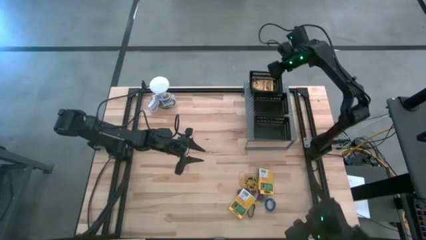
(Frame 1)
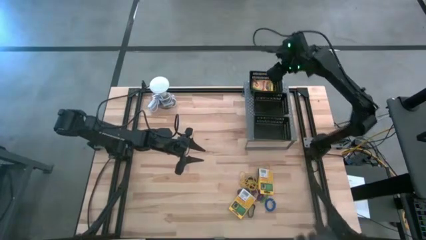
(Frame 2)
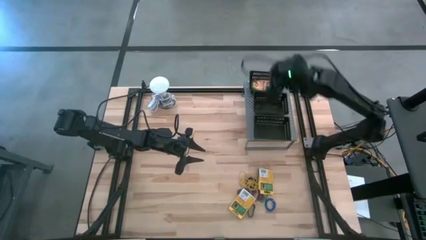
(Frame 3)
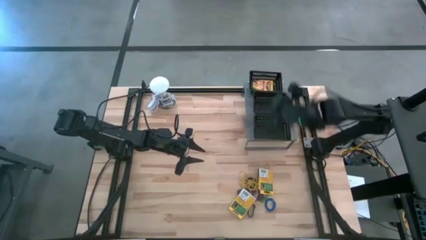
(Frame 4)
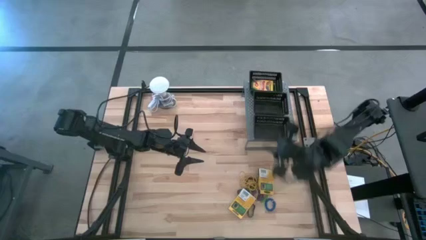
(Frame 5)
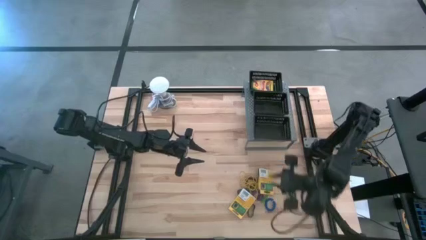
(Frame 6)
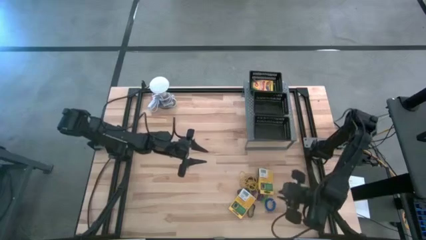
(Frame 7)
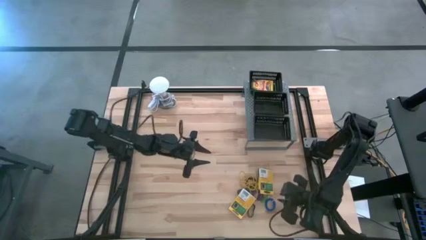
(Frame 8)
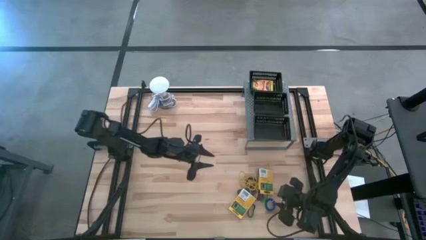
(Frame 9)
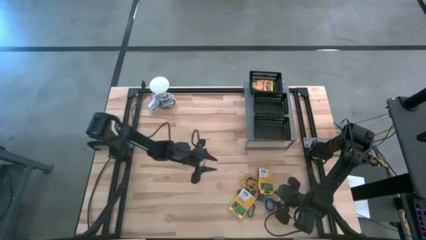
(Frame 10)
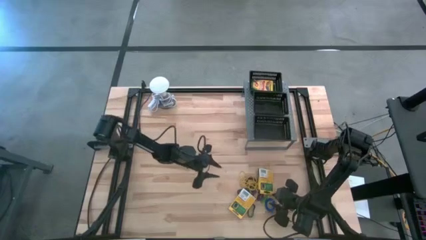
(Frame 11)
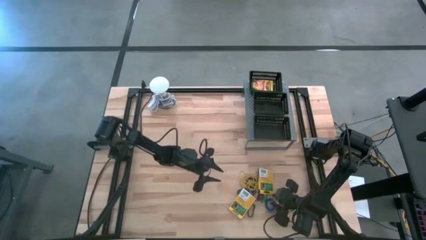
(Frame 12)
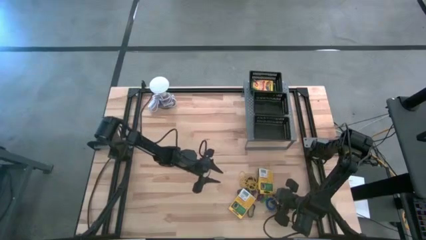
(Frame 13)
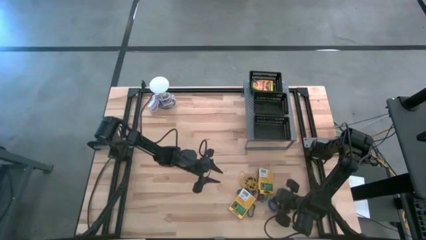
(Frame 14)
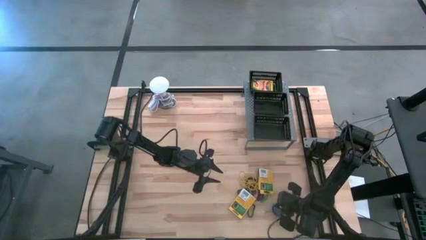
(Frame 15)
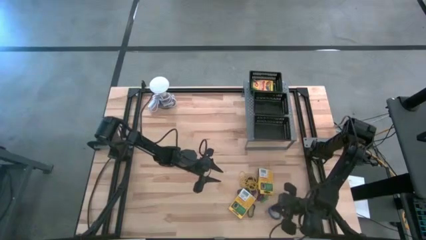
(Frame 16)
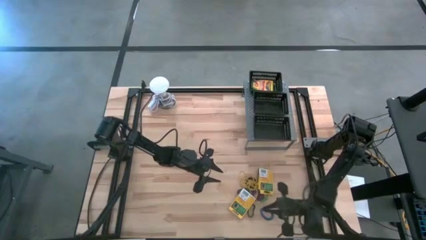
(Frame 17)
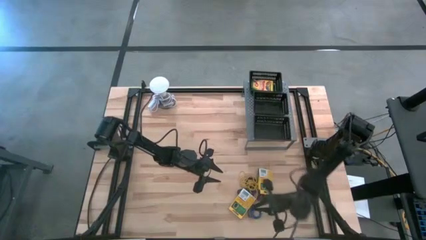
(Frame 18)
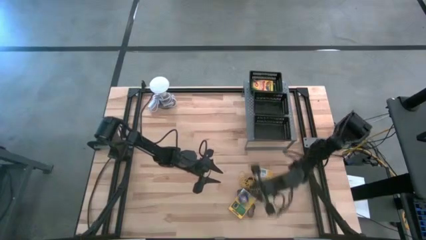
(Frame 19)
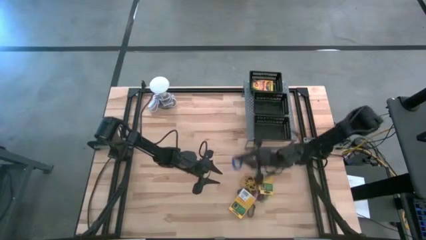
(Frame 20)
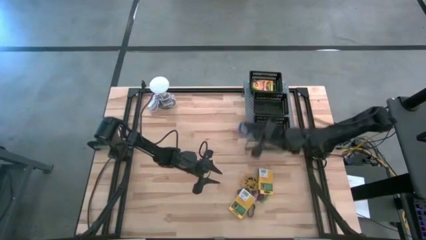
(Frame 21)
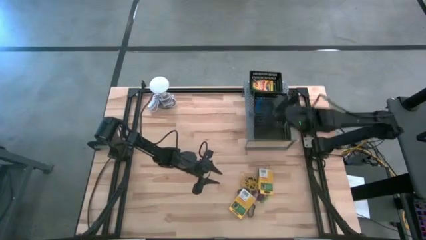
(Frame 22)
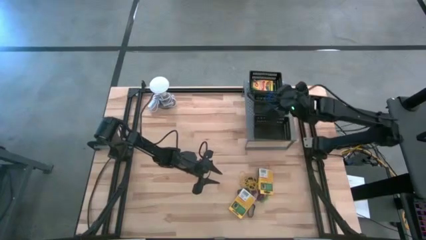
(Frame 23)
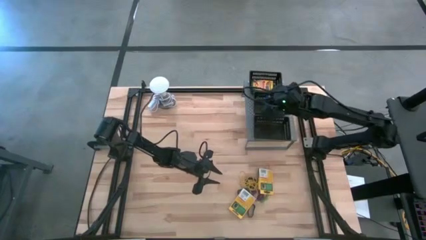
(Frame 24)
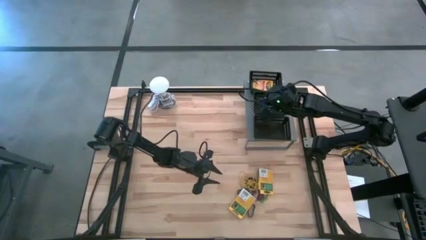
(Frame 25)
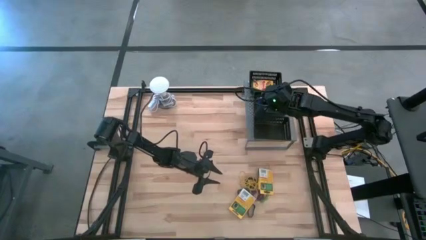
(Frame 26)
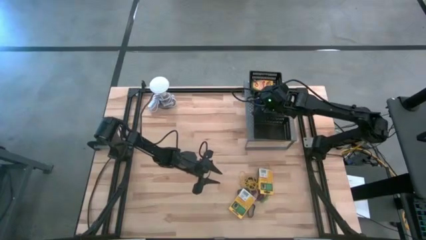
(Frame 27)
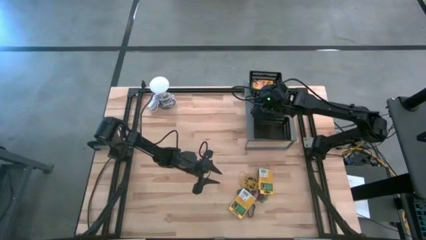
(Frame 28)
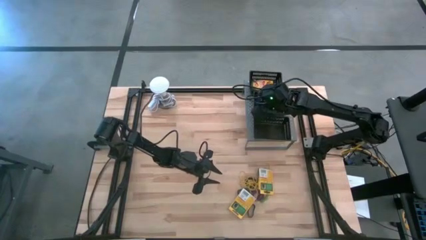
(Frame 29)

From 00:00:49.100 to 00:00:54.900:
Task: Pick & Place Office Desk Supplies
Put the blue spring keychain into the middle black bin on the shelf

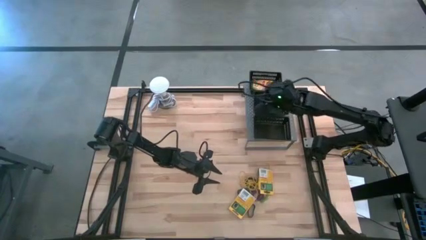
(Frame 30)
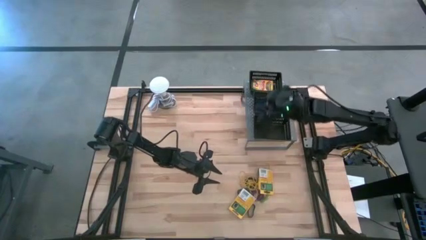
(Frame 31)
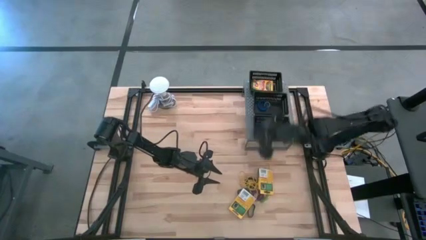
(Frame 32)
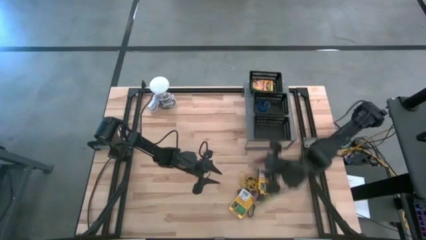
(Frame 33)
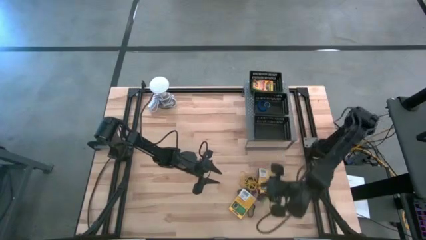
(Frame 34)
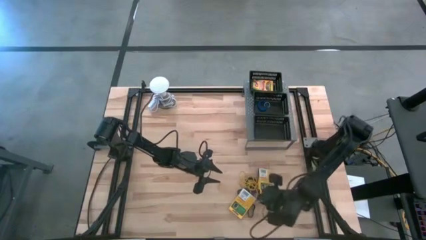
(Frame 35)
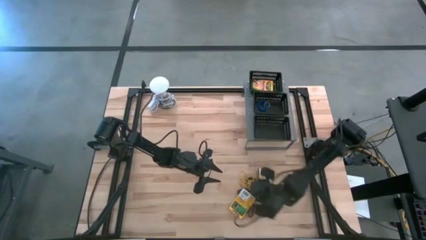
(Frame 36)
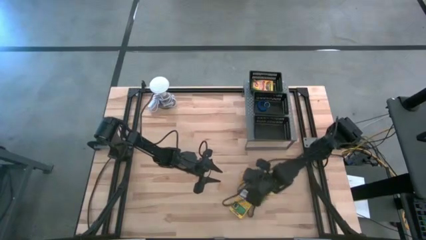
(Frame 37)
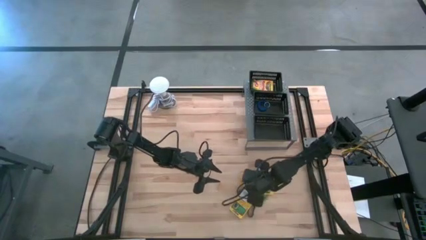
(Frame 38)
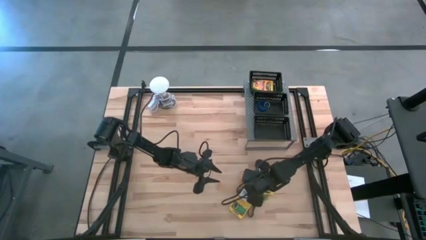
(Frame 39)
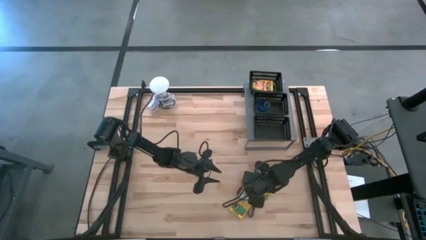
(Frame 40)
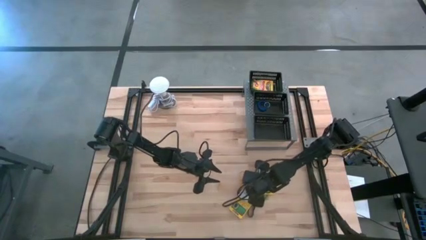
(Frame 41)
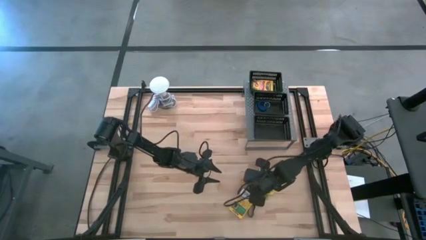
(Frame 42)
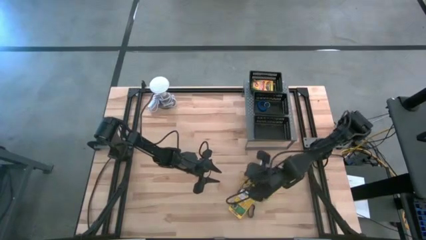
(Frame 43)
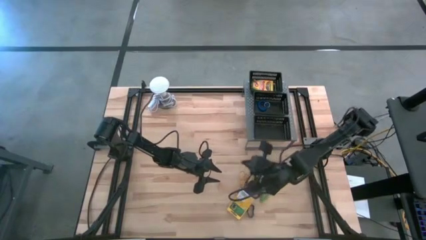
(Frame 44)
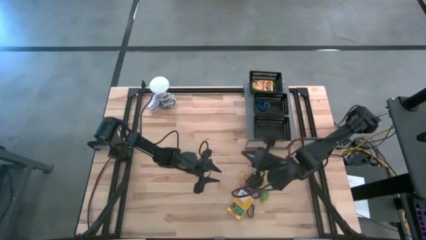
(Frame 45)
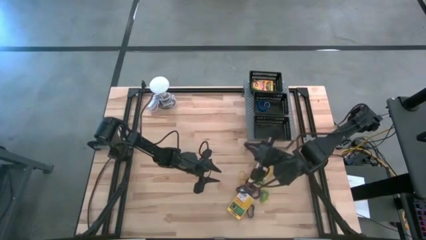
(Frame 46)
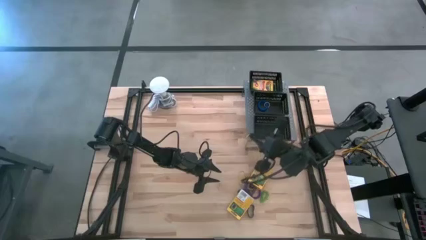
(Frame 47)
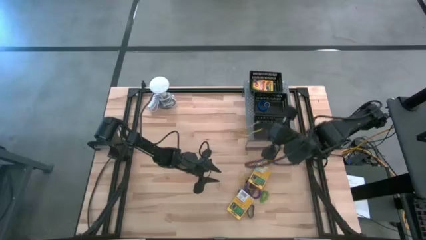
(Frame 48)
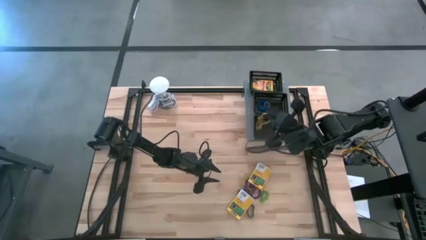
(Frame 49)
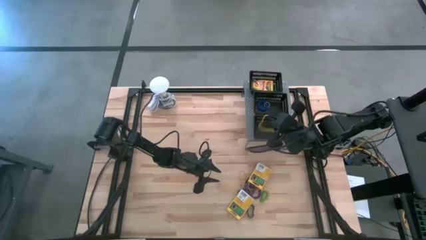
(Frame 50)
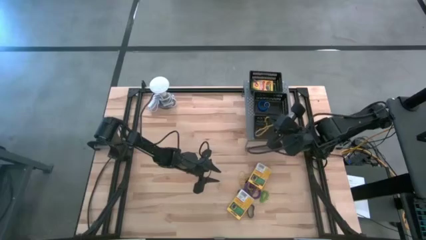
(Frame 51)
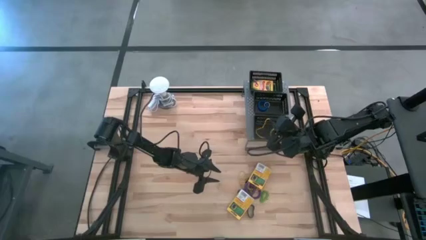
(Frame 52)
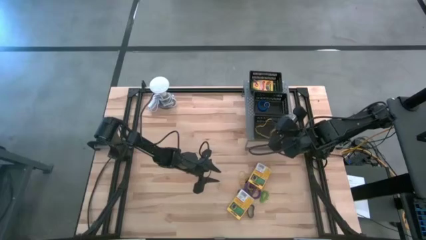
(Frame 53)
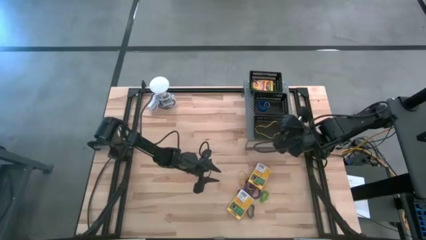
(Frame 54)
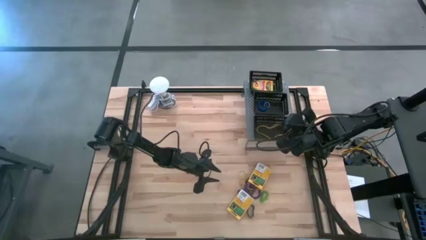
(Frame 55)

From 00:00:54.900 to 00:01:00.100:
Put the yellow rubber band into the bottom black bin on the shelf
